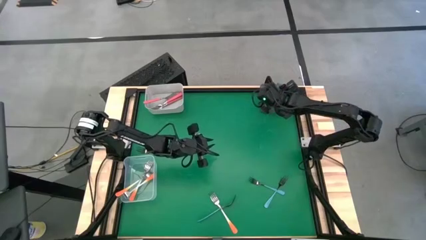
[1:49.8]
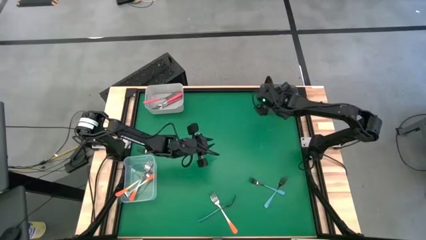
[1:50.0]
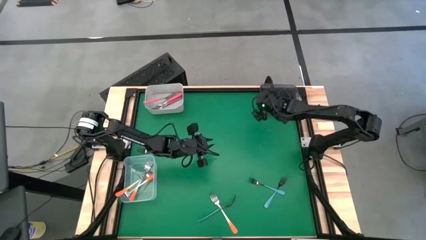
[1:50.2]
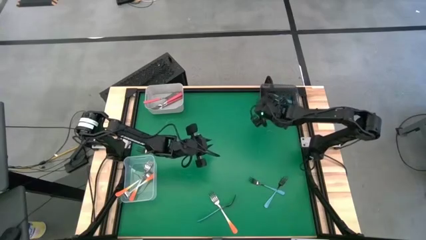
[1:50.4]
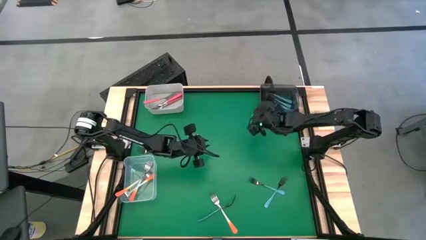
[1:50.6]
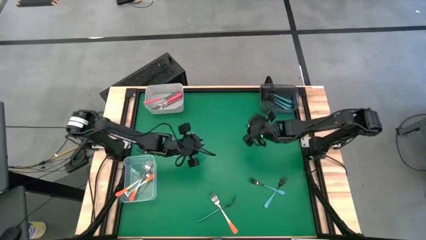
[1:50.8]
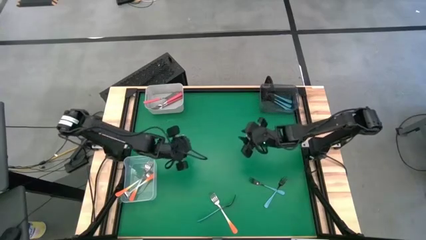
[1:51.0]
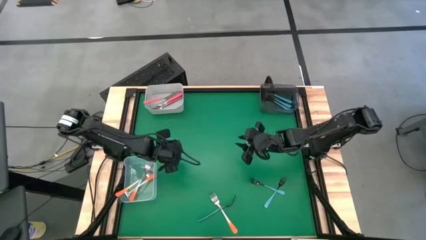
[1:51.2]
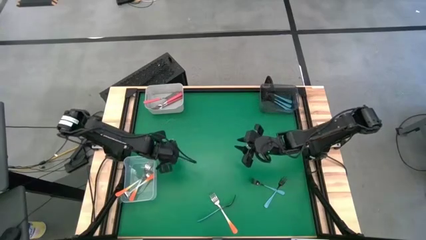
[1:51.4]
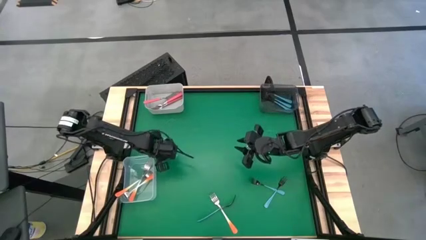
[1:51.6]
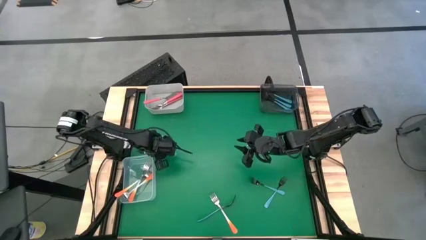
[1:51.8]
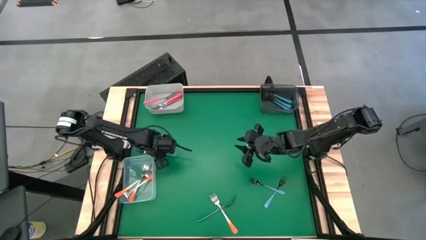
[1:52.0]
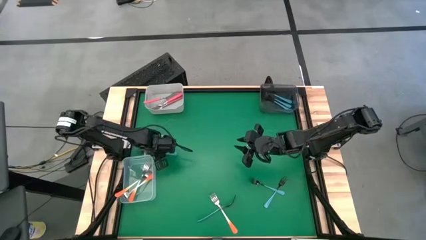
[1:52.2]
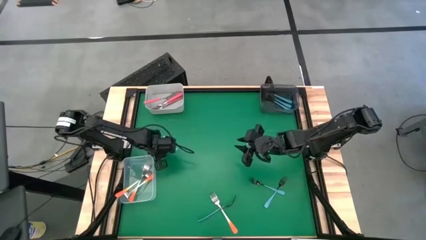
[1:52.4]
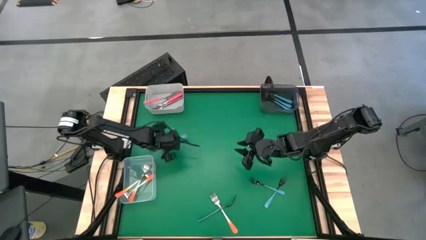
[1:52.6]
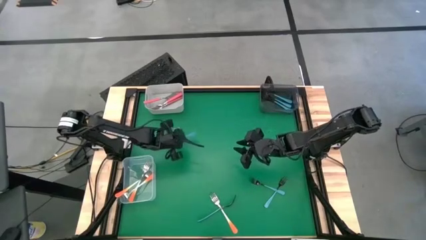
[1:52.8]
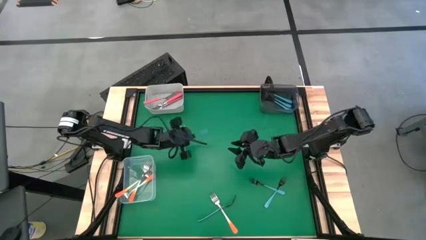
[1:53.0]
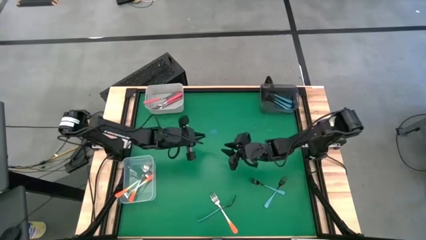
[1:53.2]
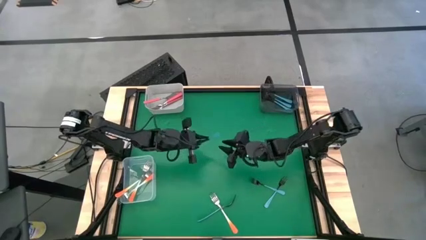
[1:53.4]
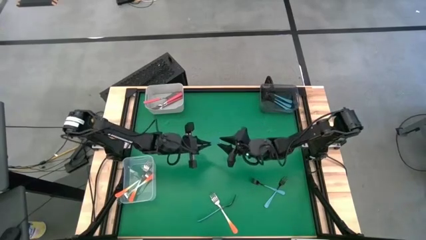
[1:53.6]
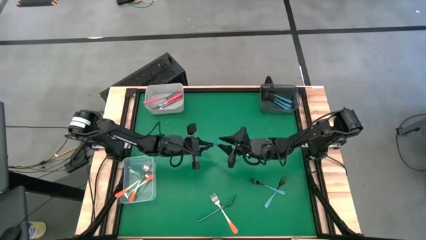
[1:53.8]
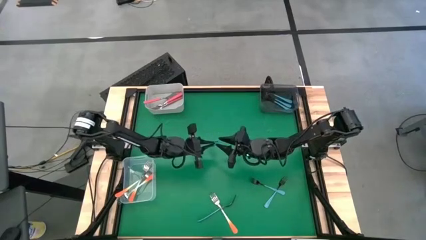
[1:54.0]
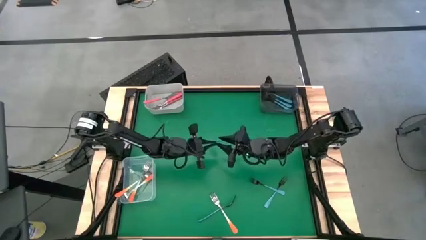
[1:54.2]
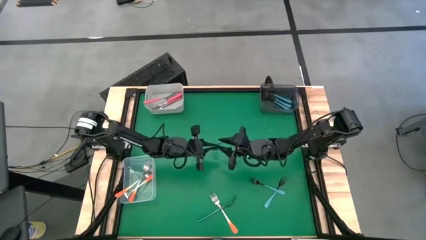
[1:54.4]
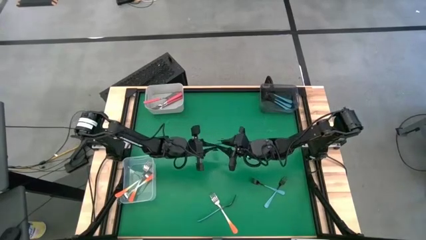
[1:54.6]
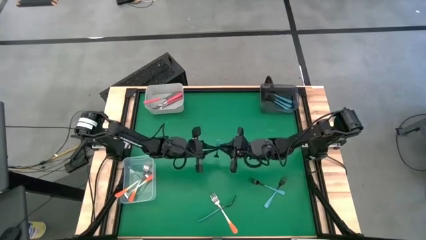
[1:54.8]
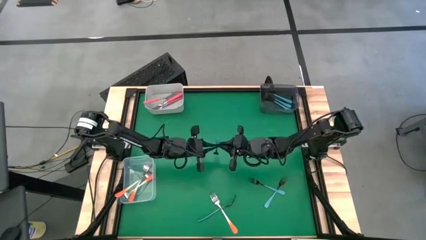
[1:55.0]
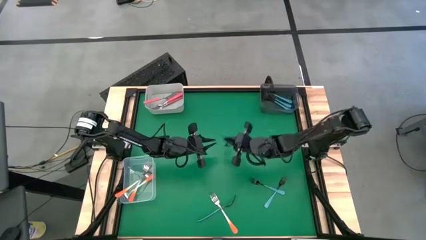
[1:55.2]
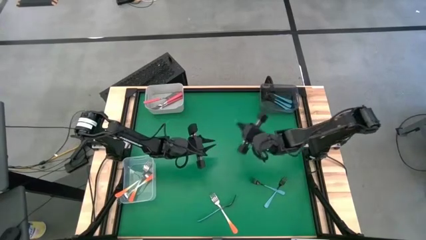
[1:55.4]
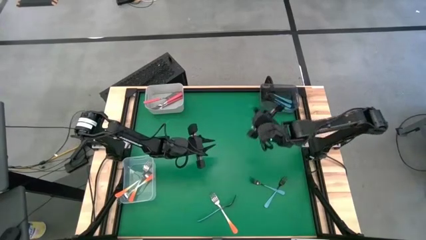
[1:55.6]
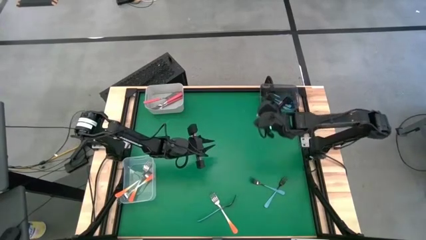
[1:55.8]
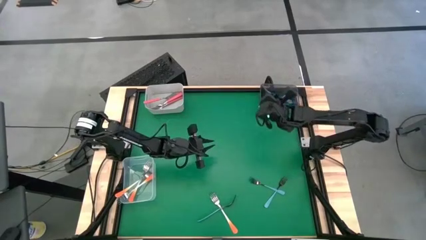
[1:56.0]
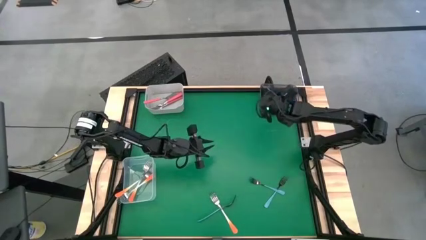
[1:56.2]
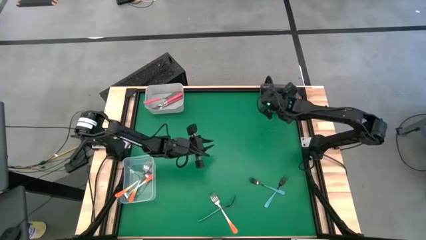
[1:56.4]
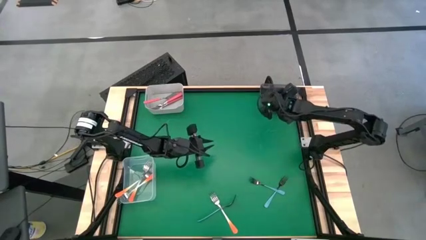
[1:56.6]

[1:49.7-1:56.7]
Task: Sort silverware by color (type)
Put the blue fork into the black bin

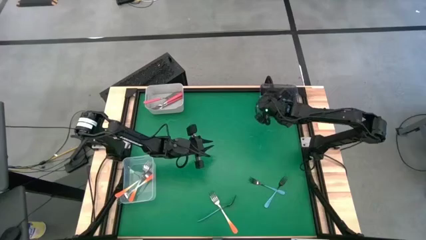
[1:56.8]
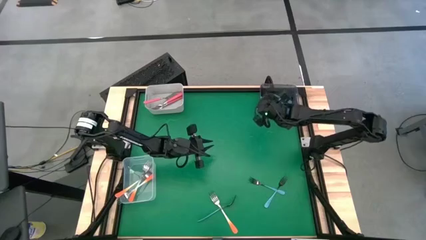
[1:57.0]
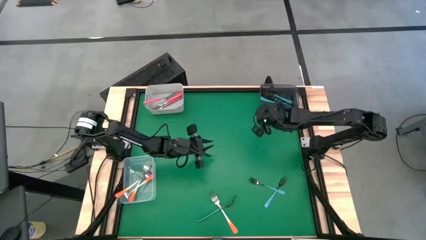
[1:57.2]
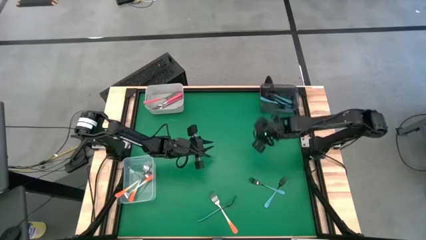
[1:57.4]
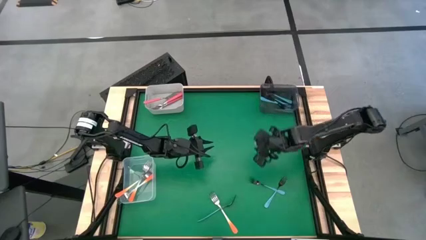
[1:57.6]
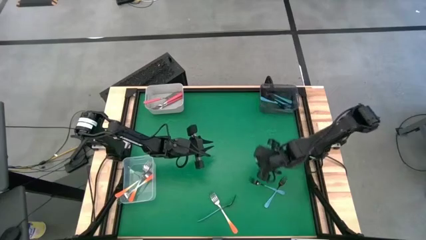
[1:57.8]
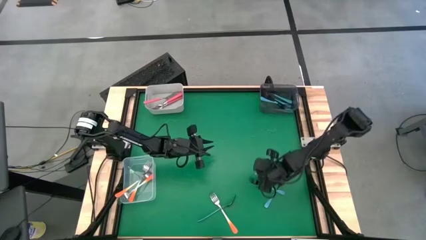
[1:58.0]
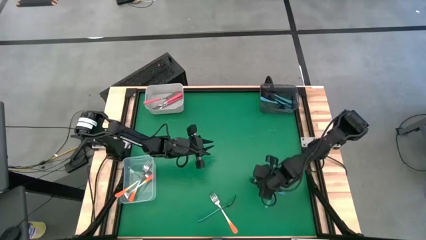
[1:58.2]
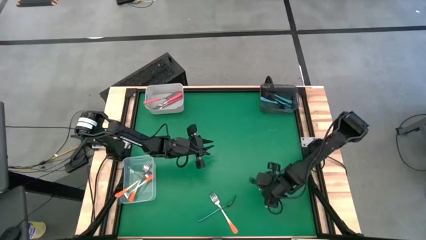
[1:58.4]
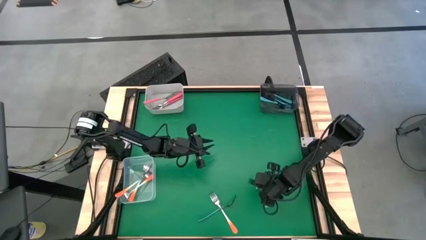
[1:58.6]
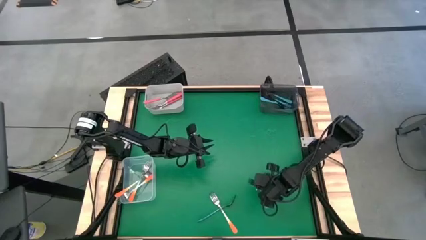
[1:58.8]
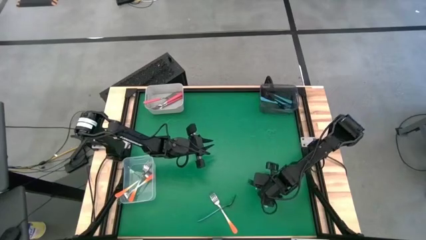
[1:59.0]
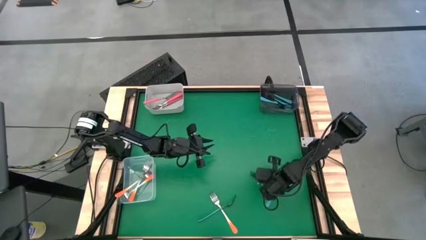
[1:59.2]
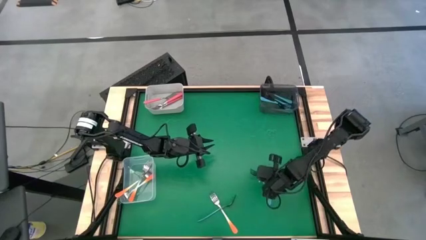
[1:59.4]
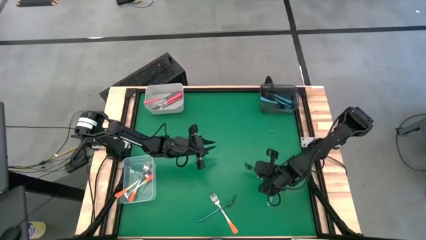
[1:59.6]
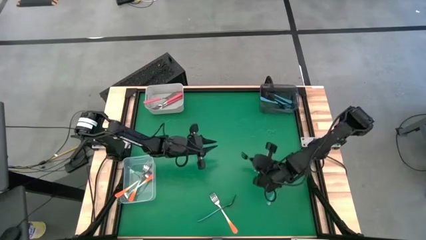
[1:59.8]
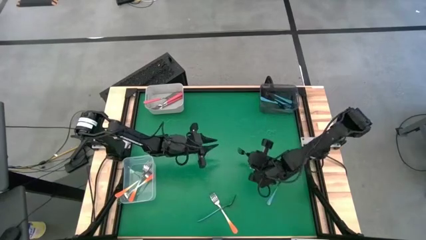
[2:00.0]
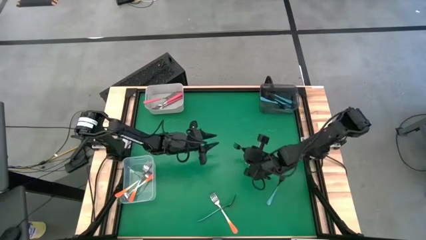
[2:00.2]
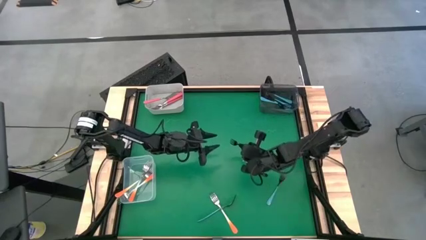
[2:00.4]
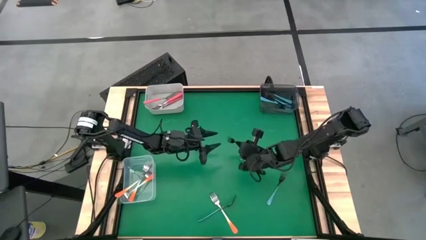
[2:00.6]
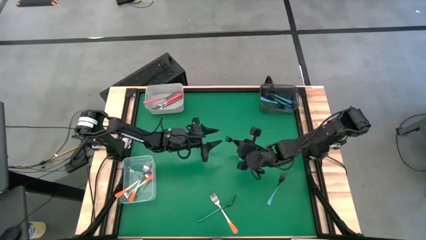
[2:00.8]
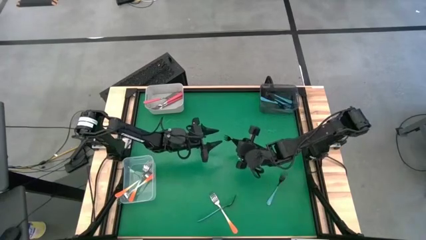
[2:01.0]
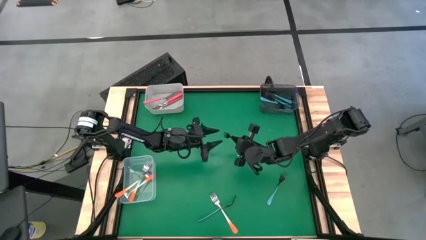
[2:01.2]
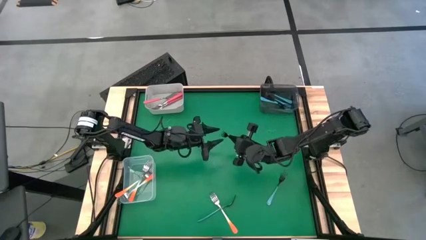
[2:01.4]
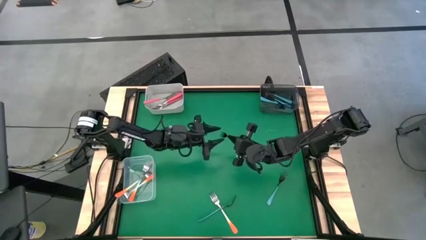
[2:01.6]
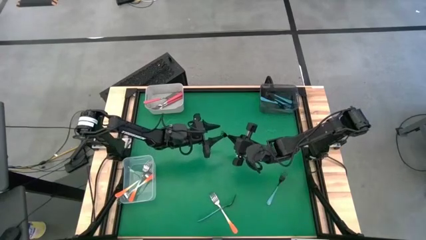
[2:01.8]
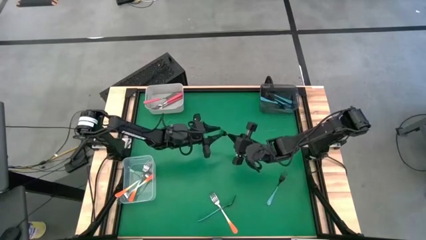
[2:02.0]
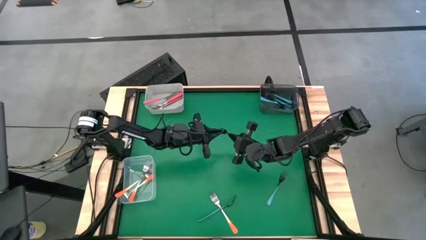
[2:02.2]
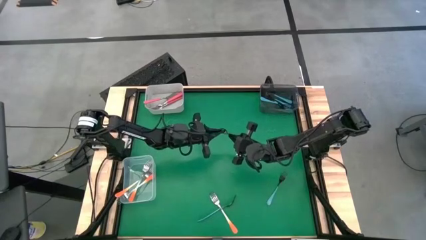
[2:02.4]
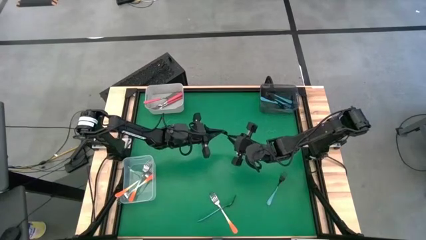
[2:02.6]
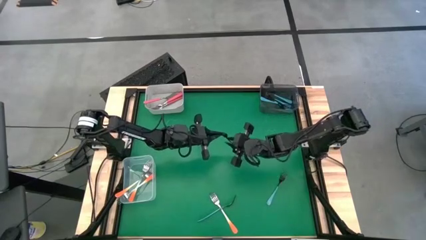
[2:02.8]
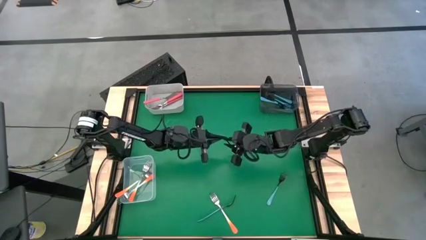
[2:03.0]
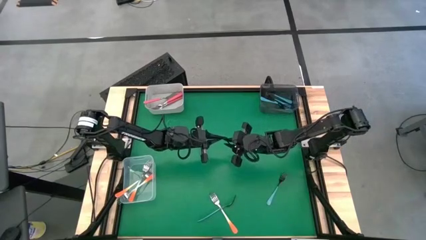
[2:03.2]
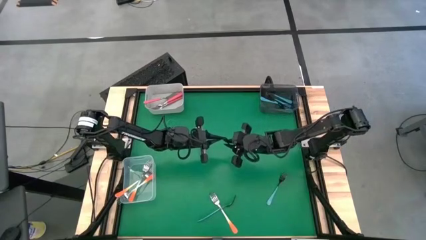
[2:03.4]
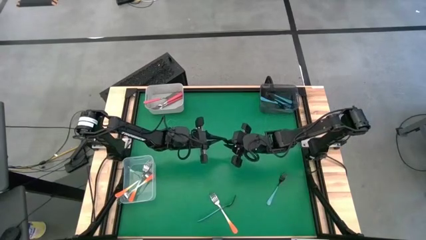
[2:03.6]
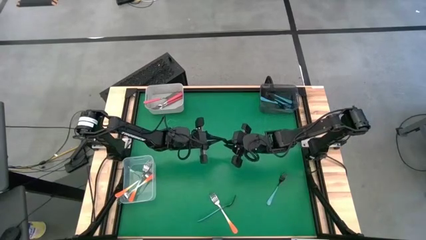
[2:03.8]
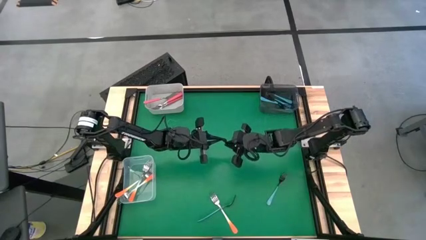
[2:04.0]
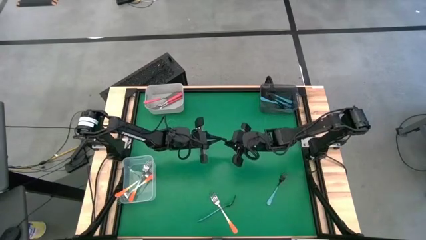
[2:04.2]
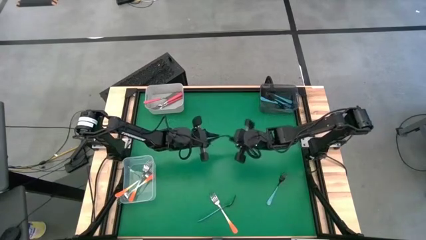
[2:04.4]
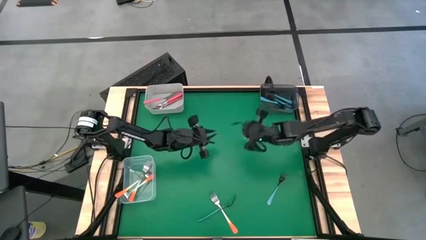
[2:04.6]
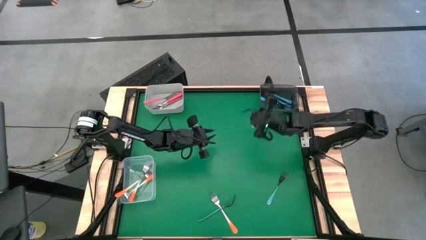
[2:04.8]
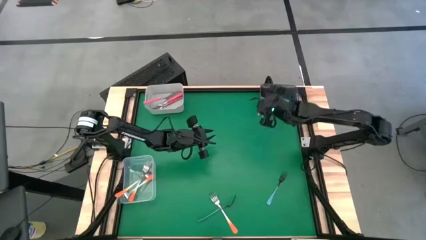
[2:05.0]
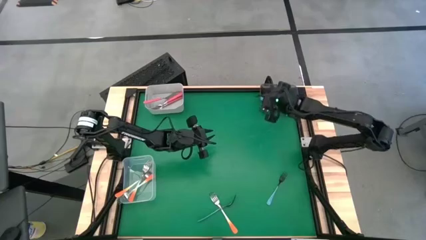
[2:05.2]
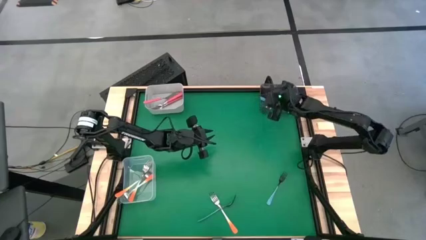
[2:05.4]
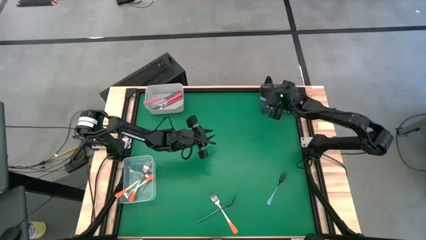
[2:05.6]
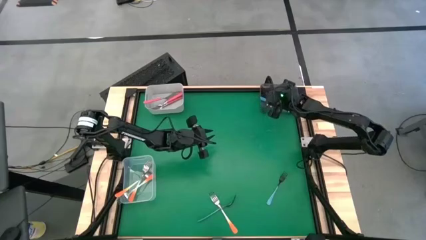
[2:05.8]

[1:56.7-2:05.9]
Put the blue fork into the black bin

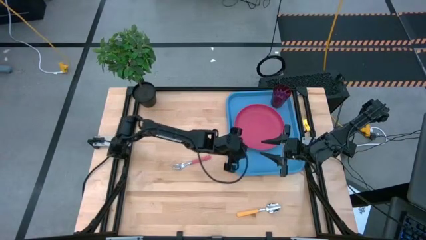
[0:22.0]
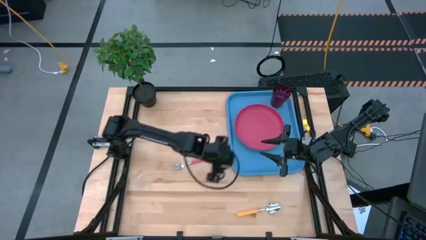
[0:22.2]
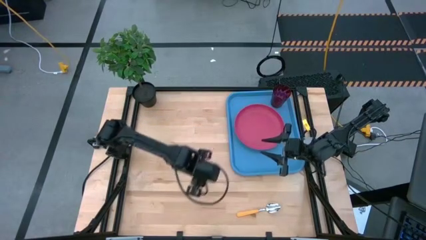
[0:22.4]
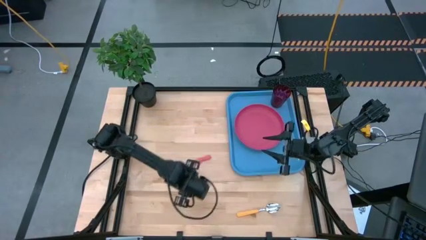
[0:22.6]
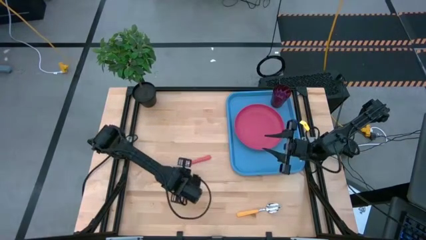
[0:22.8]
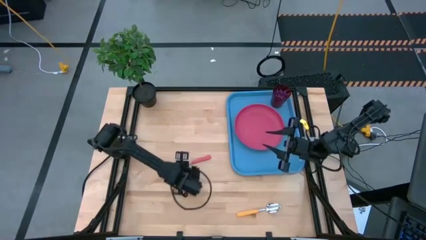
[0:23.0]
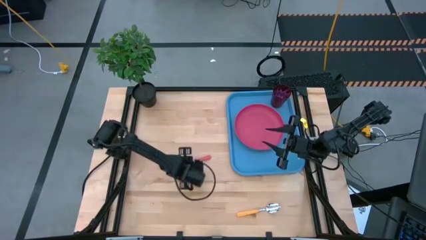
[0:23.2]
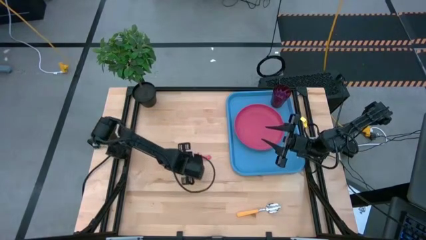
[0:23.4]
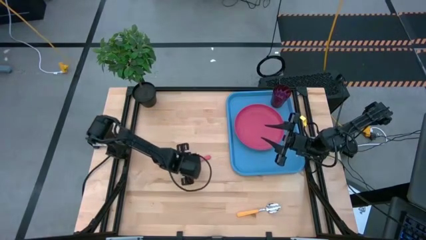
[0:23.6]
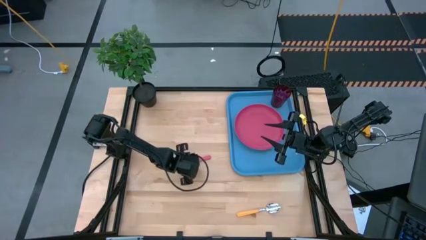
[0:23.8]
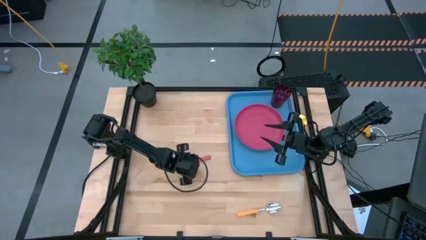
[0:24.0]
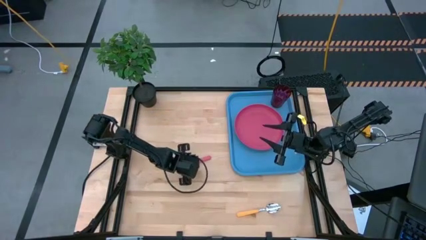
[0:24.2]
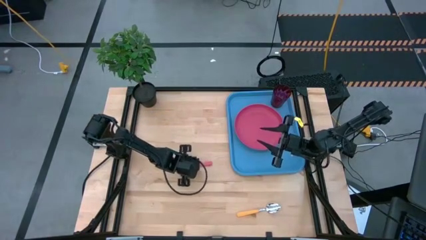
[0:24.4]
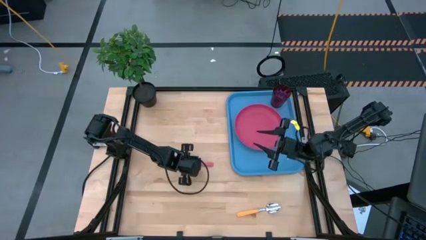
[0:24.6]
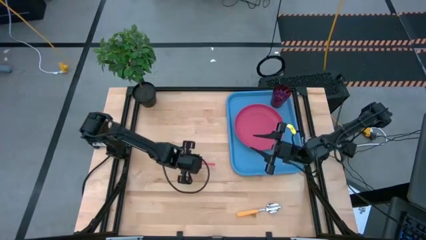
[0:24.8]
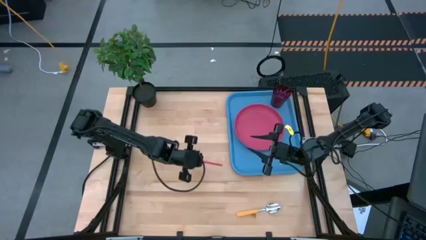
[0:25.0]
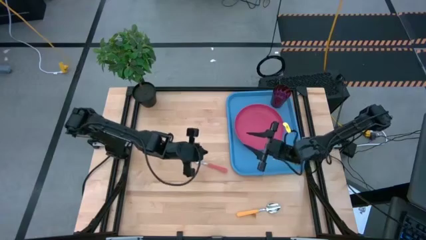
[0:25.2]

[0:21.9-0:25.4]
Task: Pick and place plate/cup/fork/spoon on tray
Put the pink fork on the blue tray
